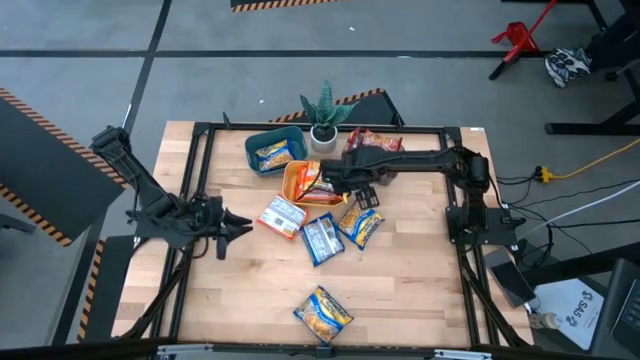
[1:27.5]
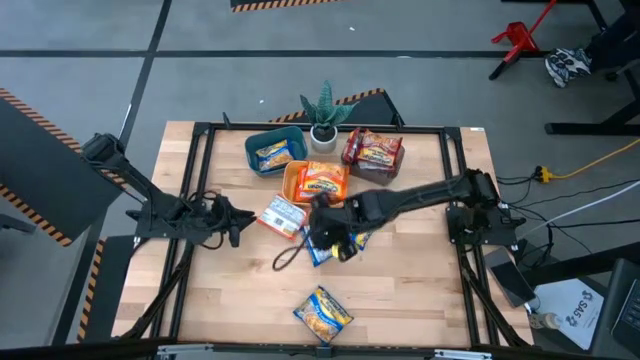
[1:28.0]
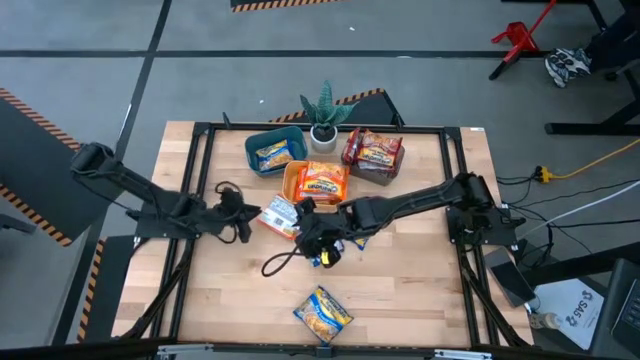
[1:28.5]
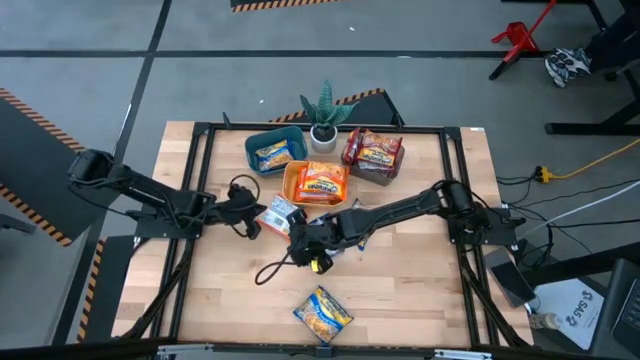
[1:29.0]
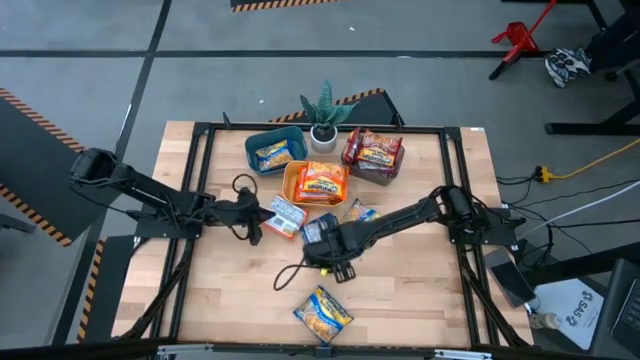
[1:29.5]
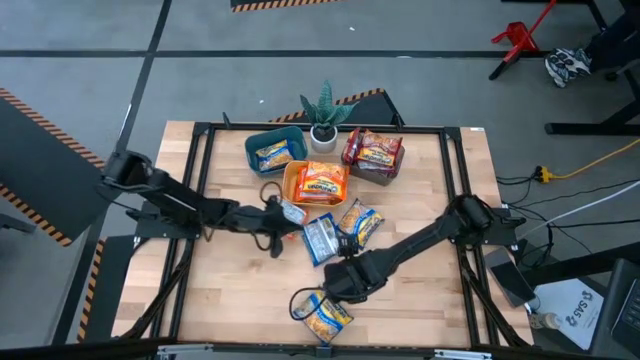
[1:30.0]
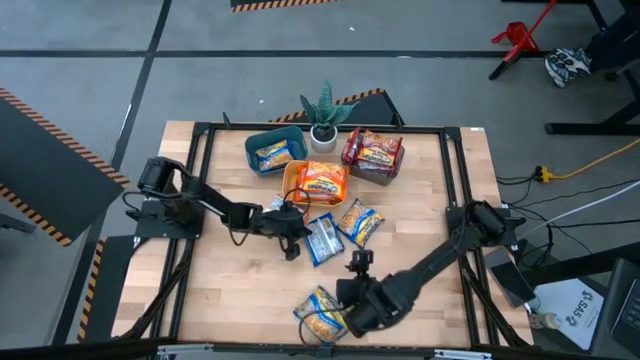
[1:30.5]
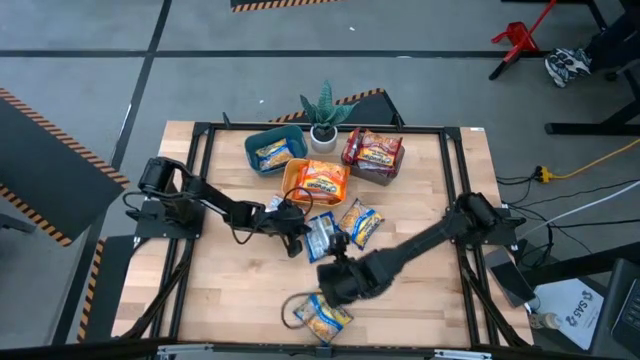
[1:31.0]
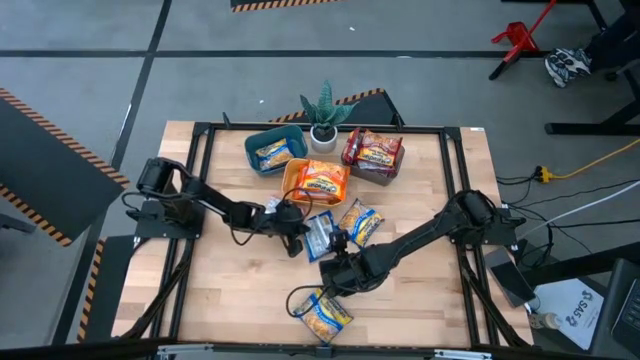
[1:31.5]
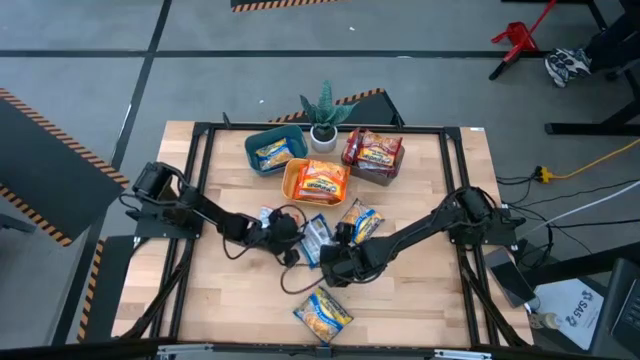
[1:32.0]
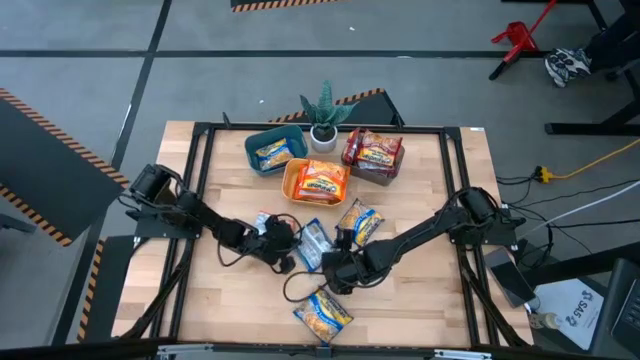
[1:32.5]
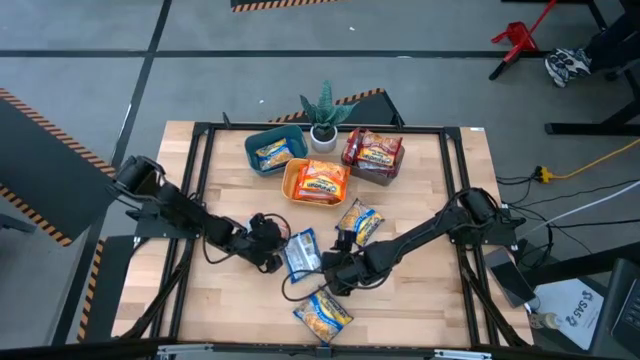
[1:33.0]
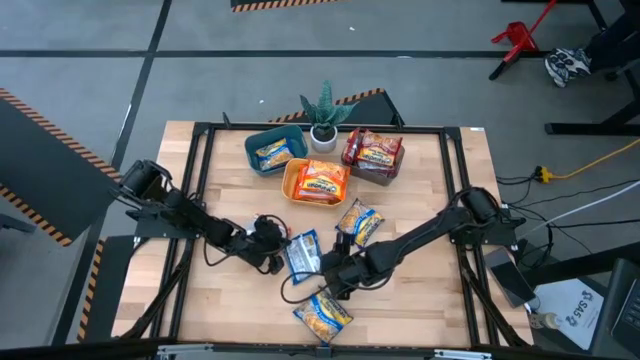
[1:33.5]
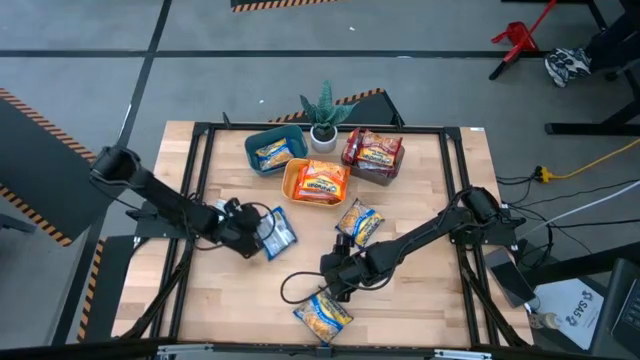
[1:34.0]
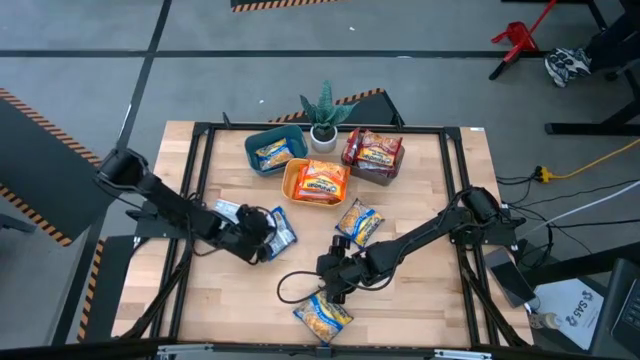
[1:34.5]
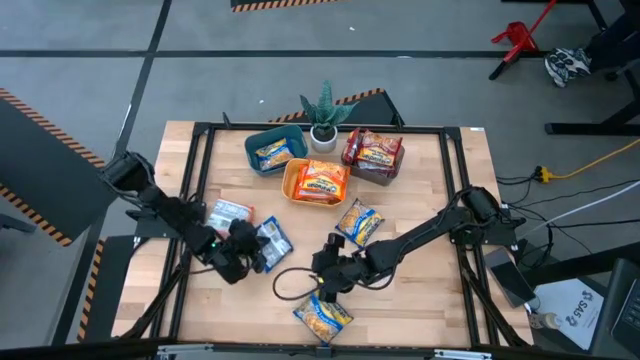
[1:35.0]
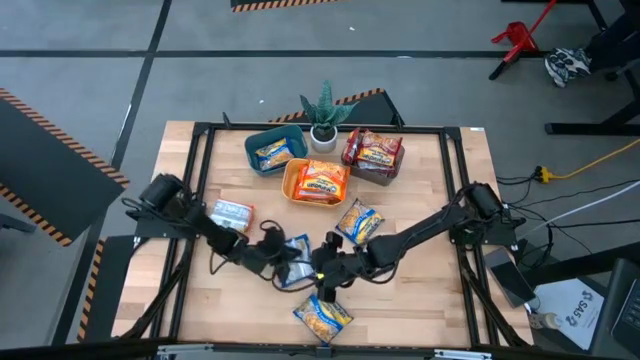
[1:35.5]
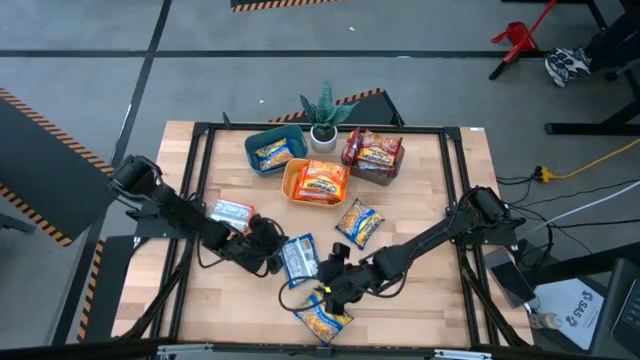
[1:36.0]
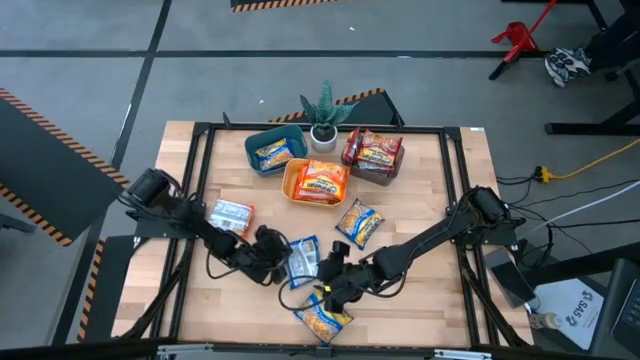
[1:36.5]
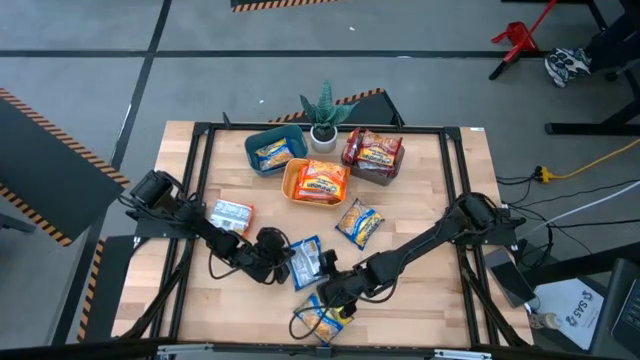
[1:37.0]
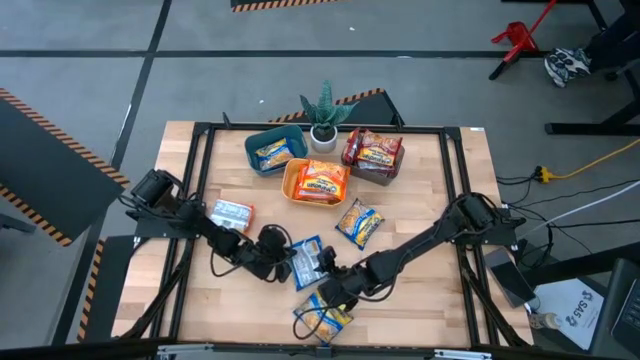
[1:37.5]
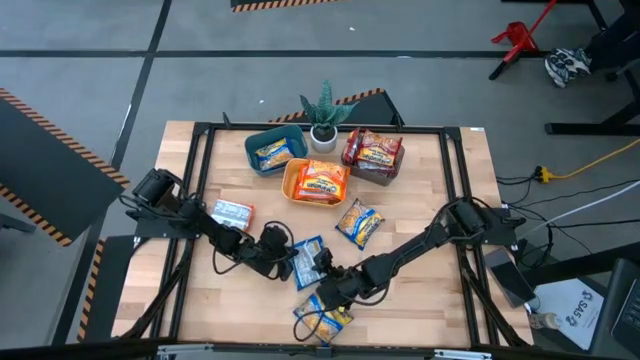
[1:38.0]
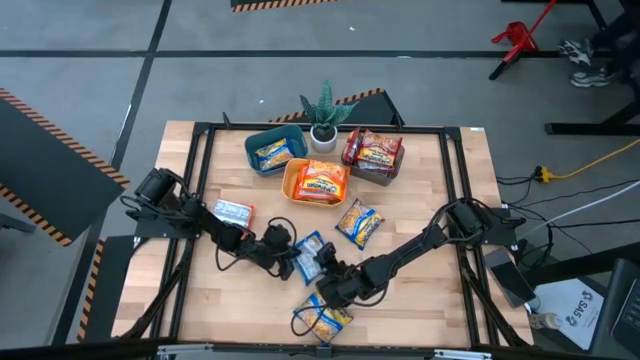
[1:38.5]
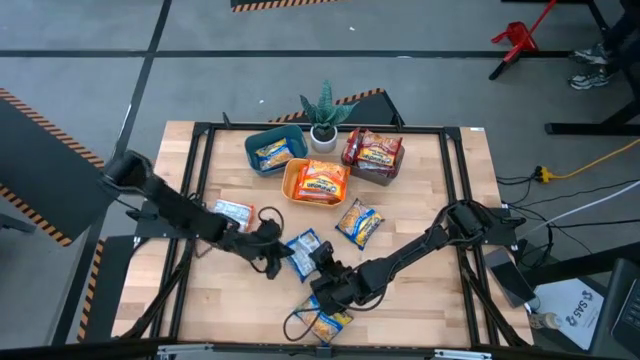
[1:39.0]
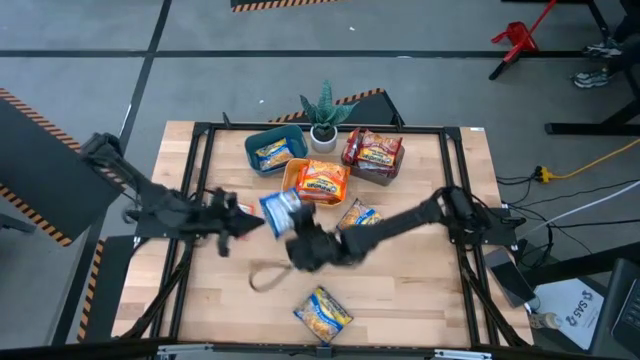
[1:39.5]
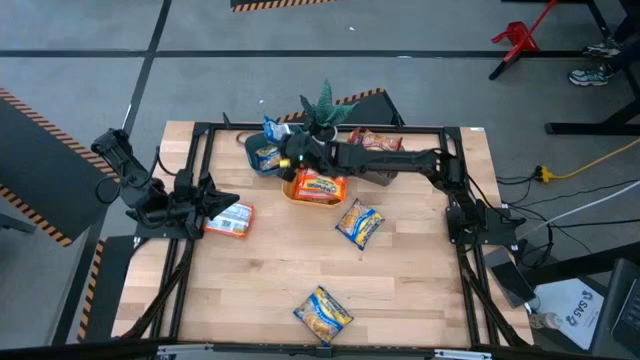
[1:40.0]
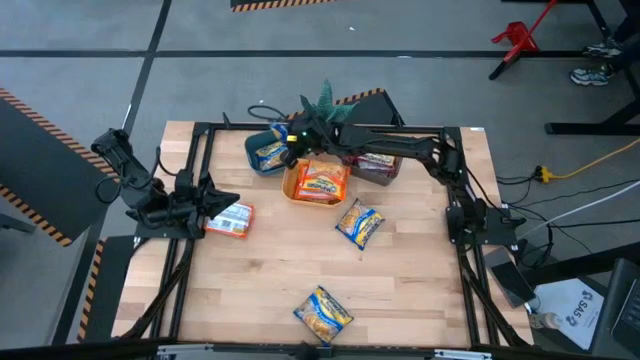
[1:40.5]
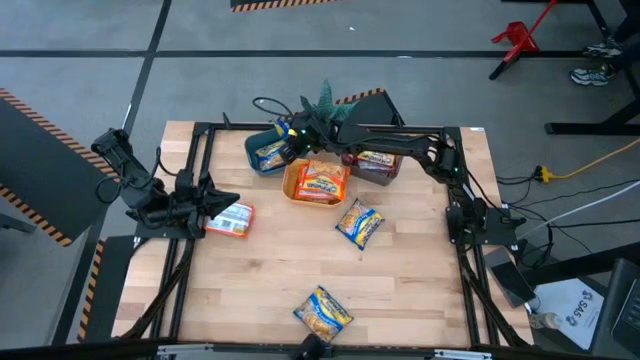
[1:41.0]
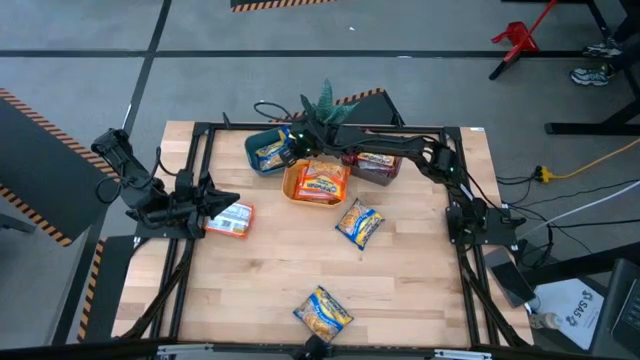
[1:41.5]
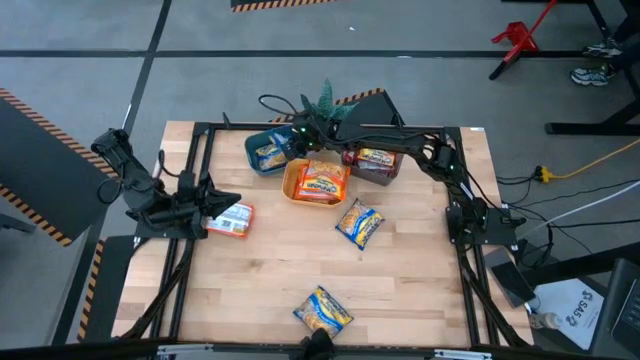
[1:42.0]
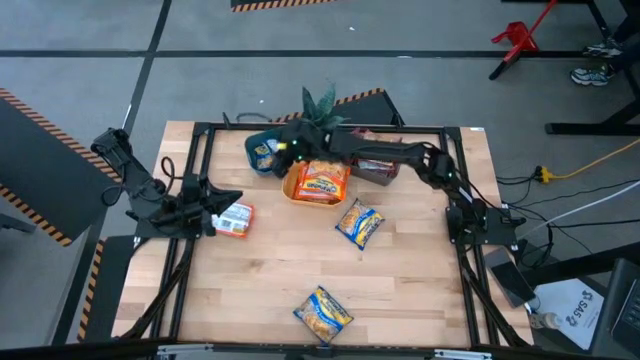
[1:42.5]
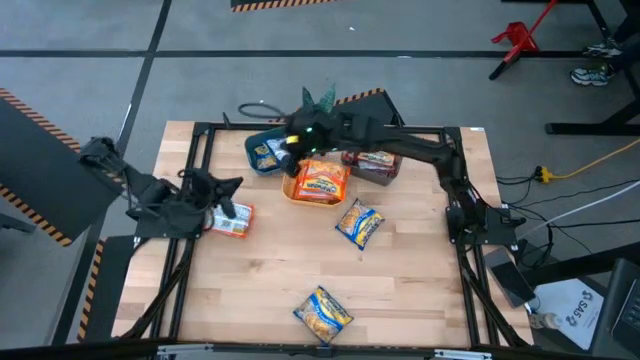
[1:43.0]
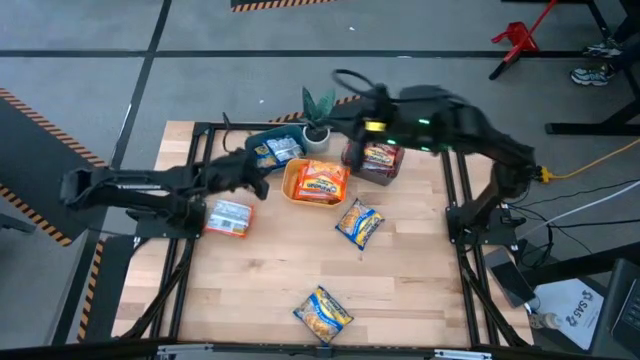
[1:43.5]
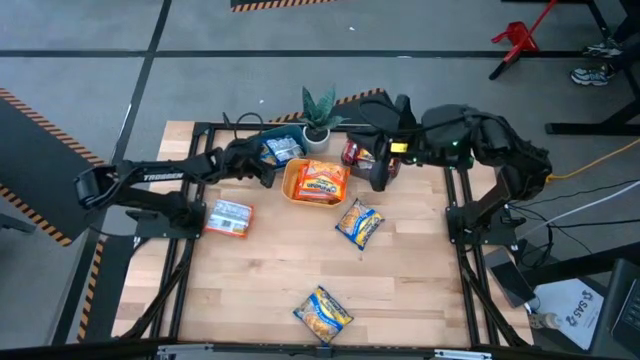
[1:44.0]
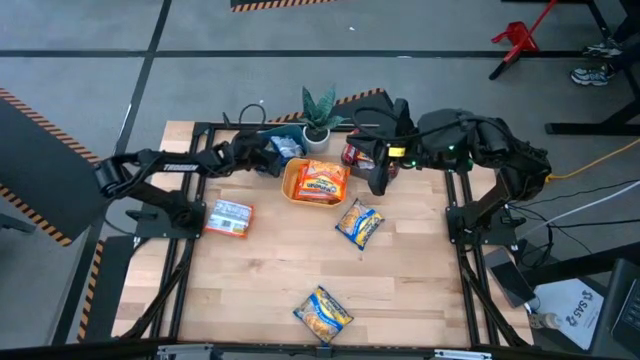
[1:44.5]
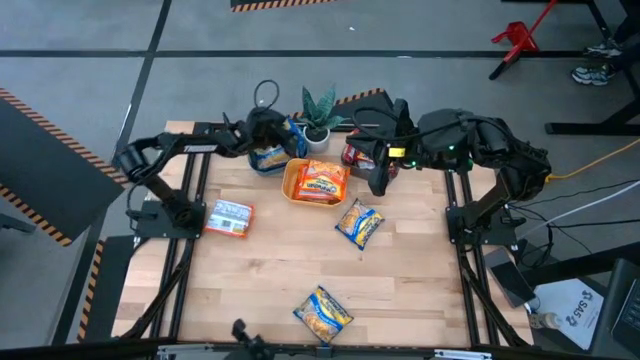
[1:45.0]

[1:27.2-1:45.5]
Task: Sort Maruchan noodles
Put the middle blue noodle pack into the blue bin

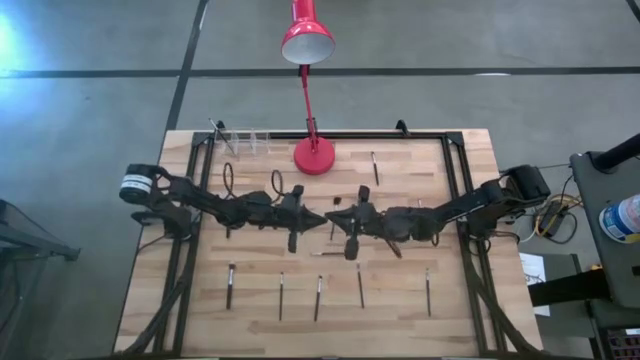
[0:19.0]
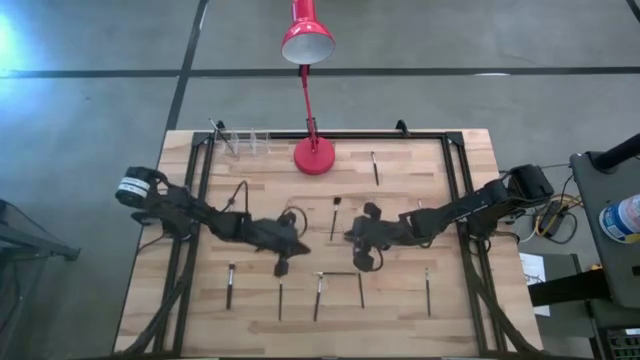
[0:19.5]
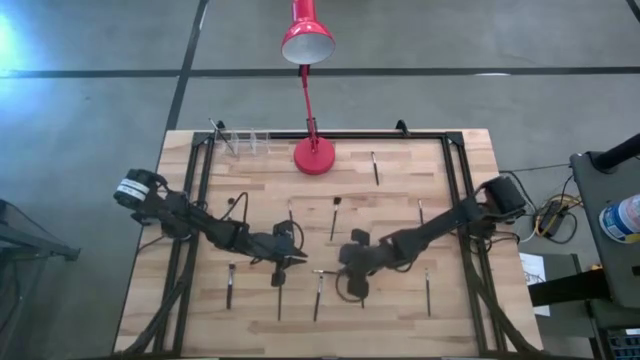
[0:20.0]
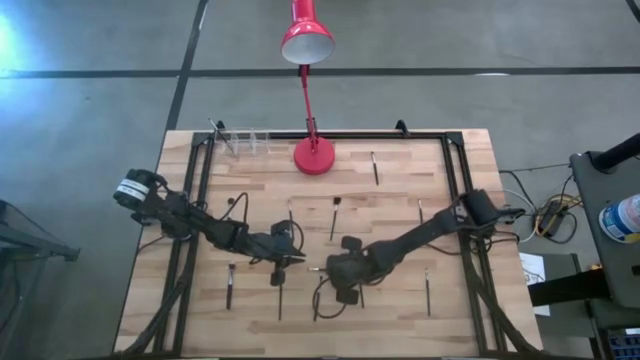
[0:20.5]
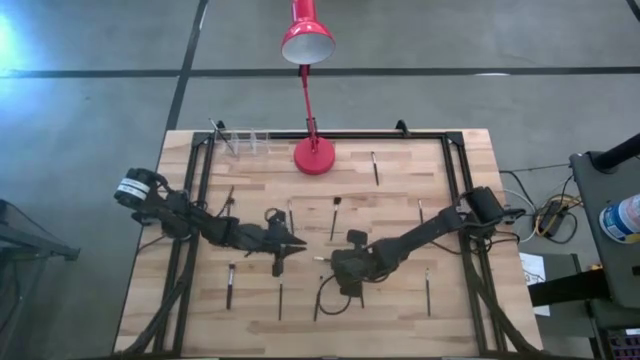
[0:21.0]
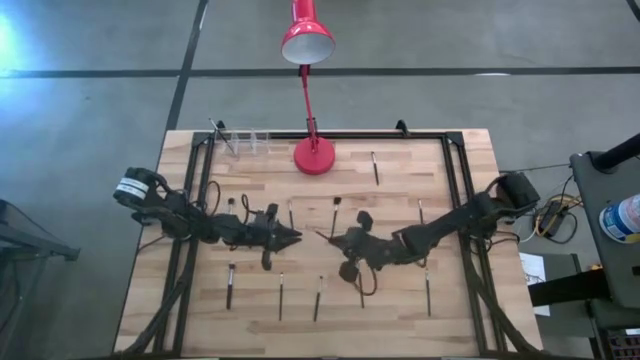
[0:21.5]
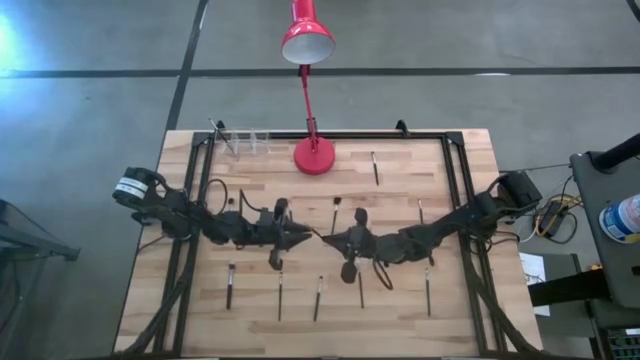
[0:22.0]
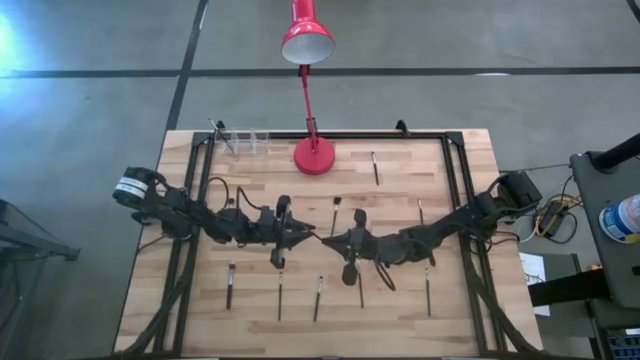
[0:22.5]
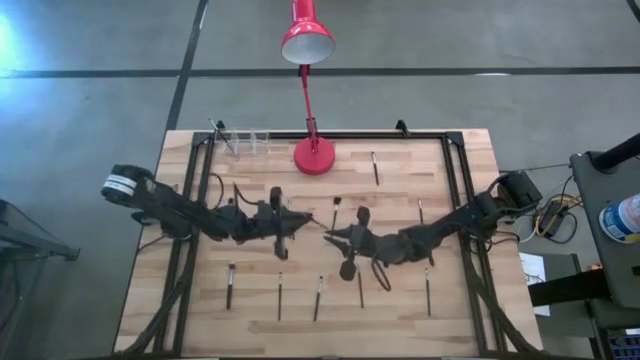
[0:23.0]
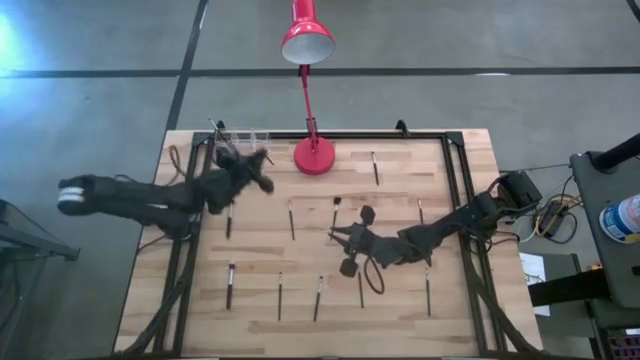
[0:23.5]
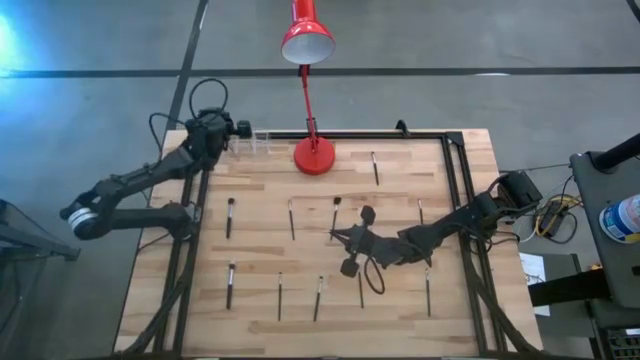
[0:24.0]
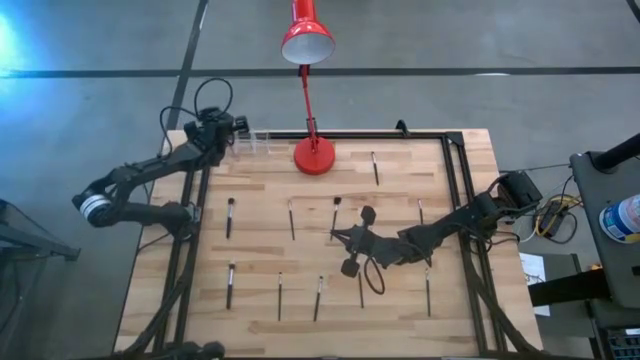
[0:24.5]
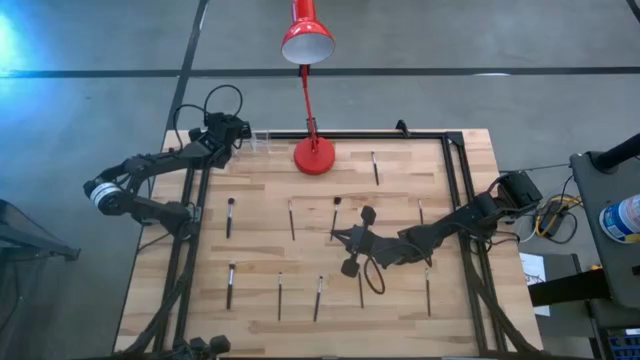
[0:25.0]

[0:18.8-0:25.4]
Task: Pick & Place Makeup Supplies
Put the makeup brush into the transparent organizer
